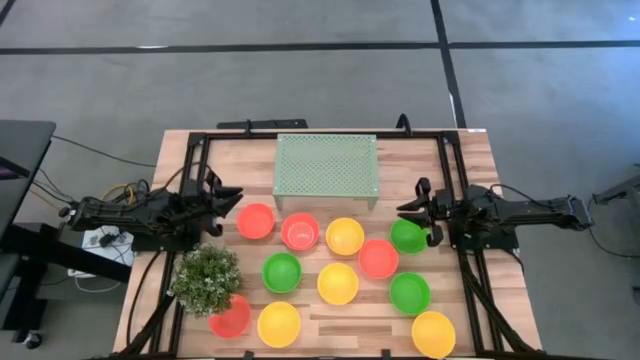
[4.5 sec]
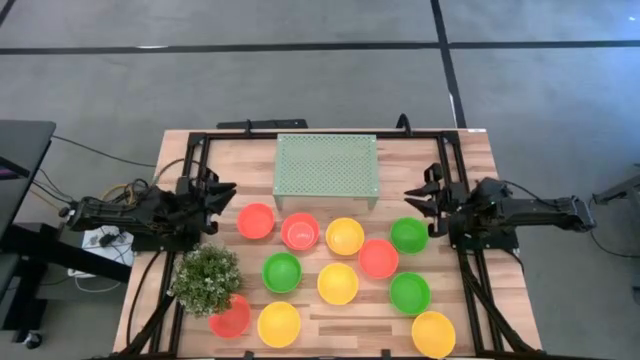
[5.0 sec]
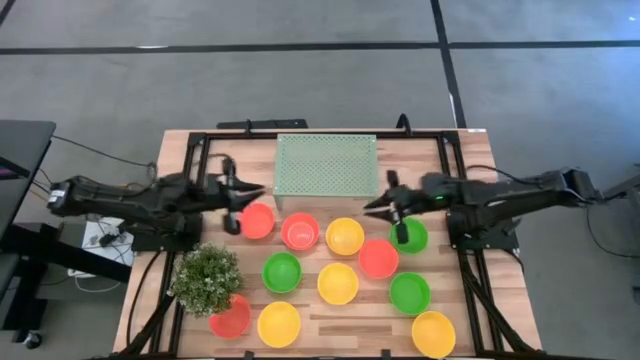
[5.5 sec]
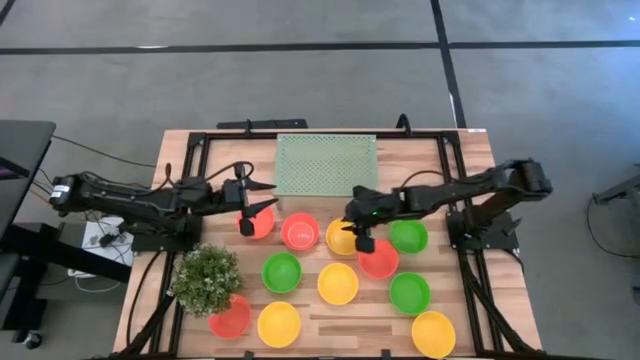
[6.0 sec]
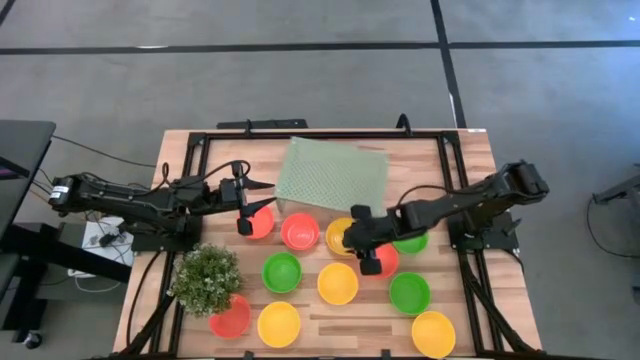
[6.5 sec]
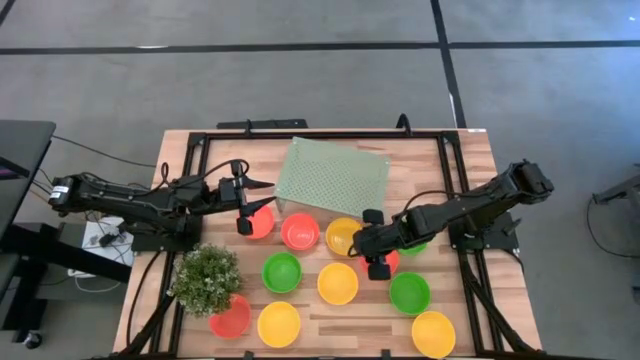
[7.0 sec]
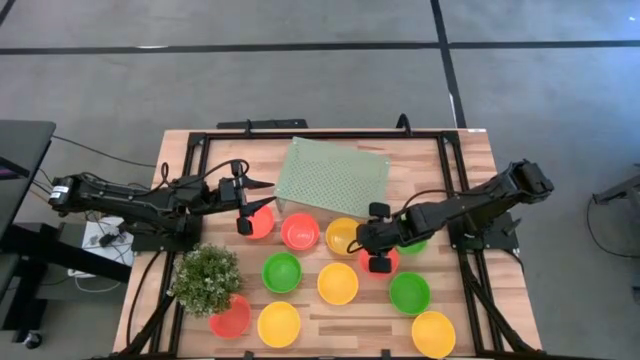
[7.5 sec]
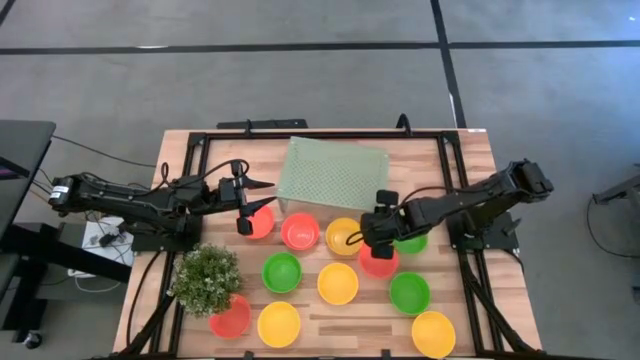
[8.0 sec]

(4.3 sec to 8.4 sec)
Task: Pick & Place Mini bowls
Adjust the shelf on the table

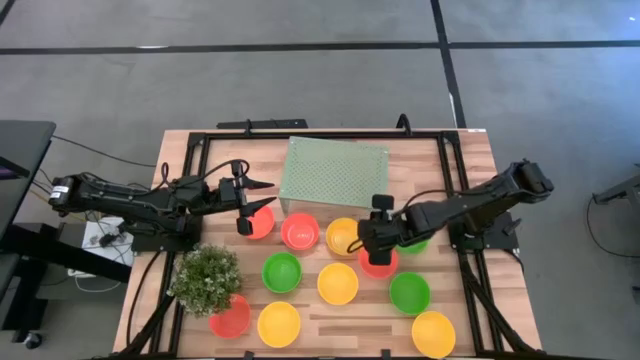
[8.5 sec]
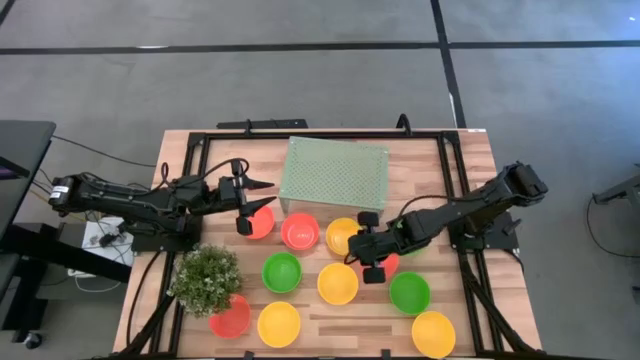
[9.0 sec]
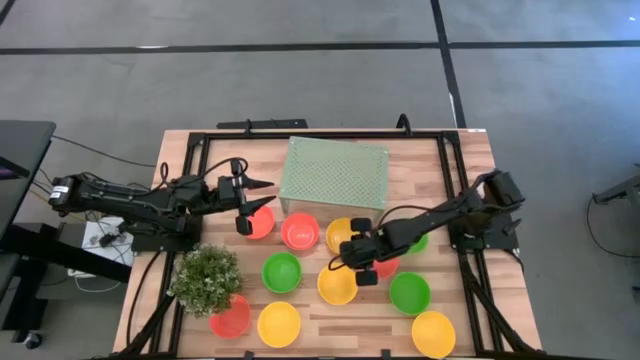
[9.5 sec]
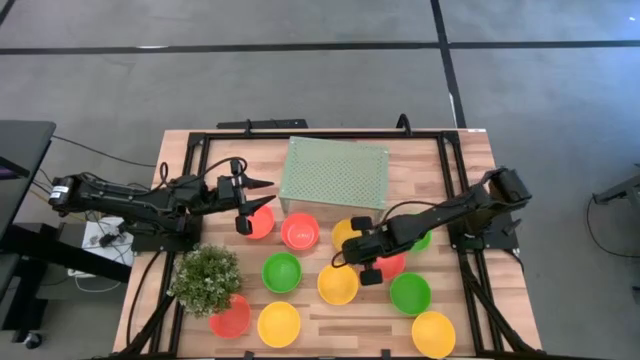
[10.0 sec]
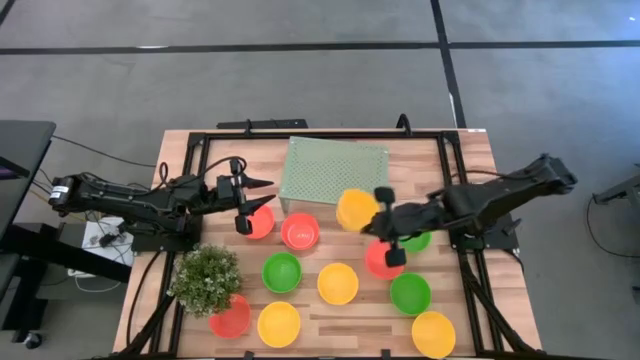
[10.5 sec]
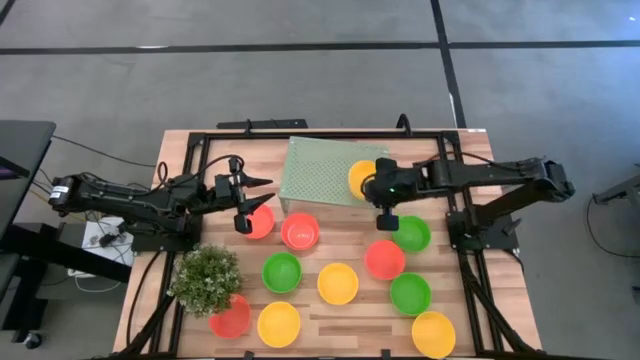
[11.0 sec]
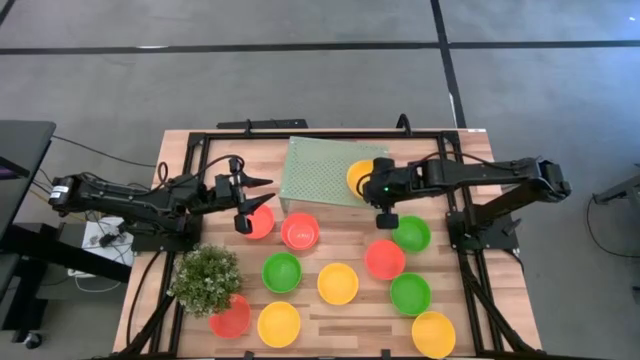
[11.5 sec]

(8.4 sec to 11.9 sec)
Put the yellow bowl on the shelf

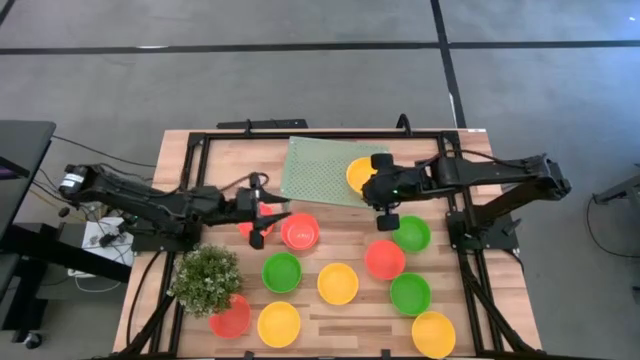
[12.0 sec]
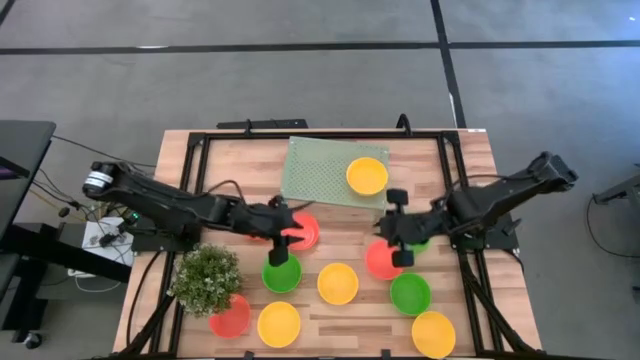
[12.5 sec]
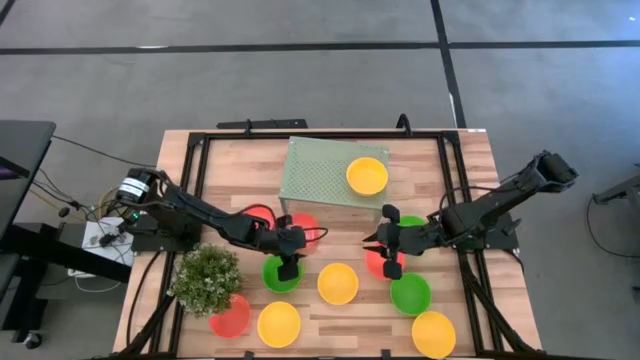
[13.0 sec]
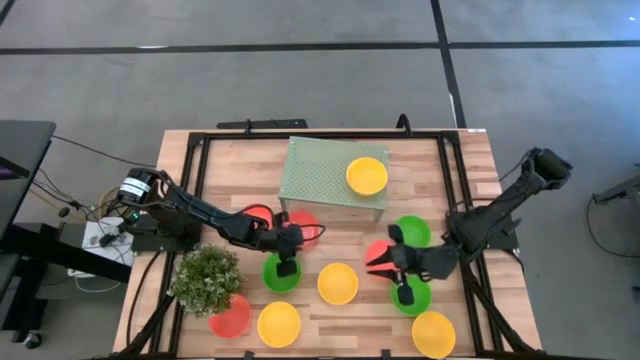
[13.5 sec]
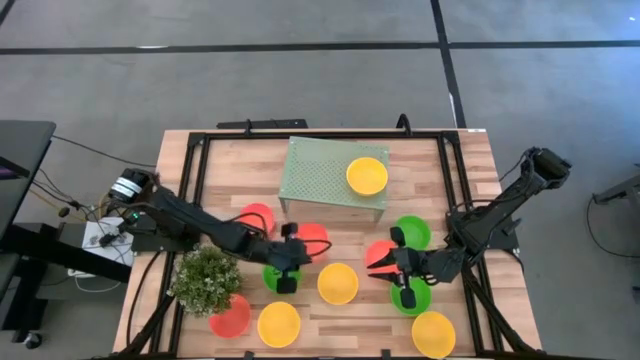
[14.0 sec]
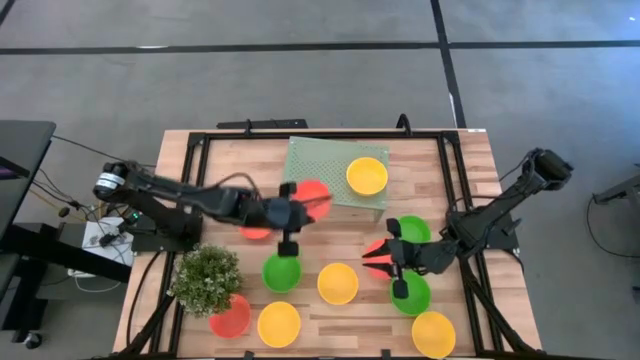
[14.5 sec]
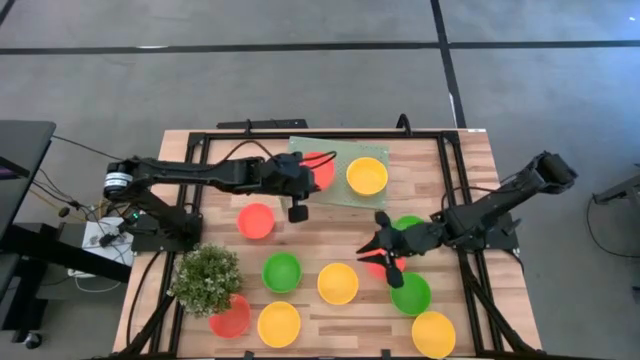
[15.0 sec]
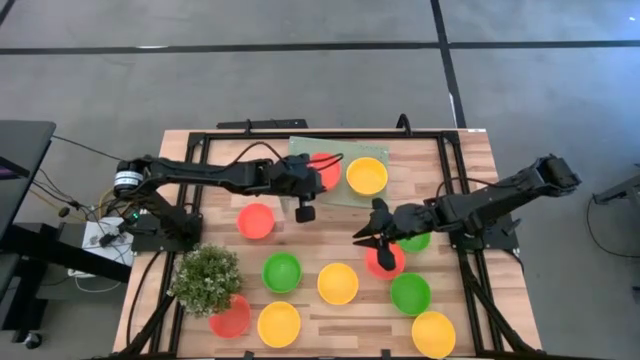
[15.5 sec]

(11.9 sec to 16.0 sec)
Put the orange bowl on the shelf

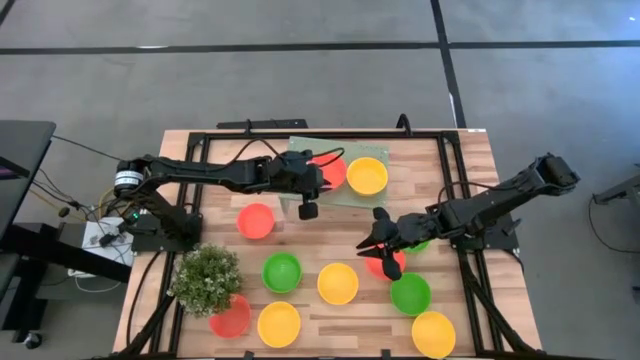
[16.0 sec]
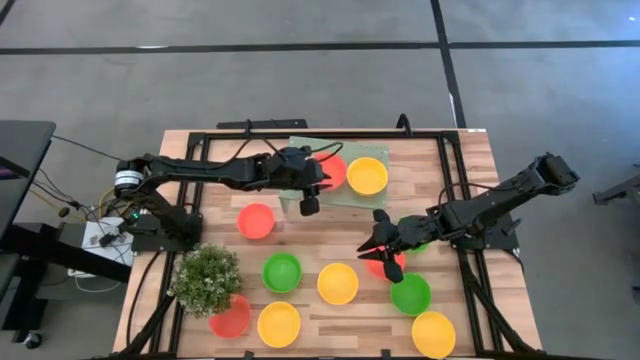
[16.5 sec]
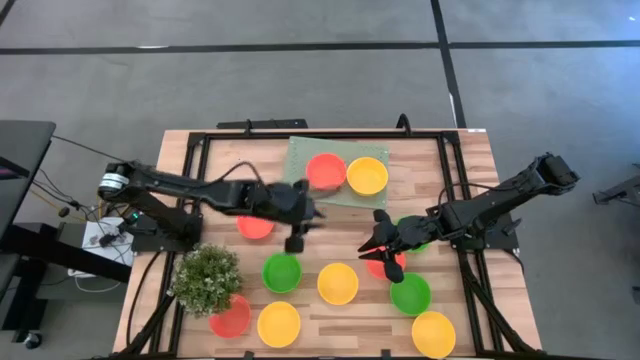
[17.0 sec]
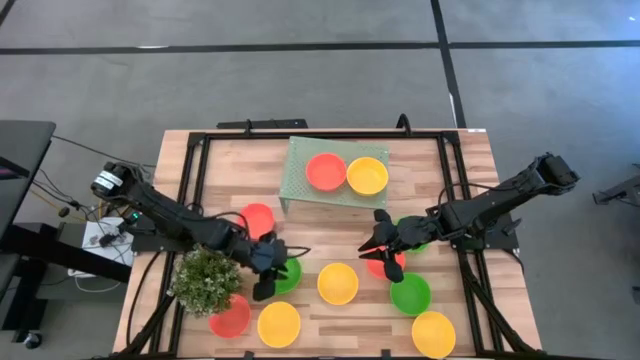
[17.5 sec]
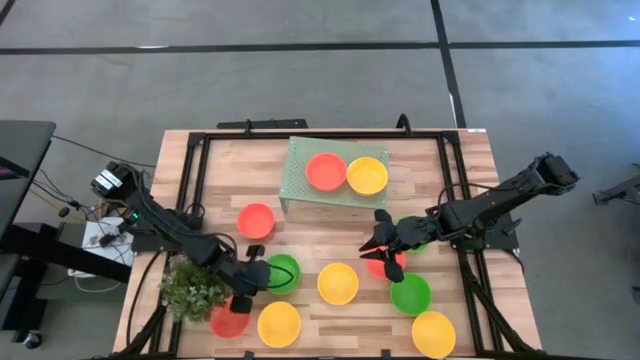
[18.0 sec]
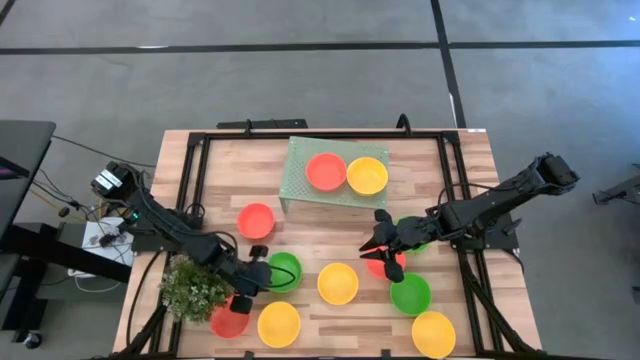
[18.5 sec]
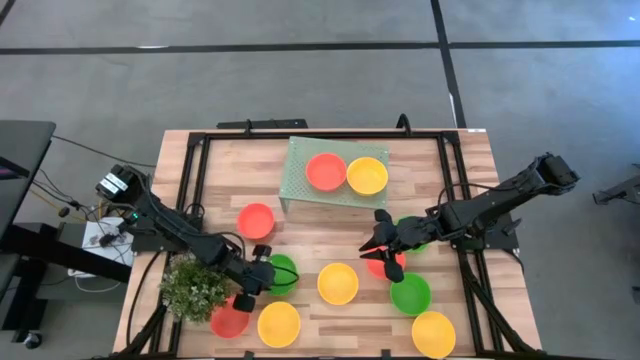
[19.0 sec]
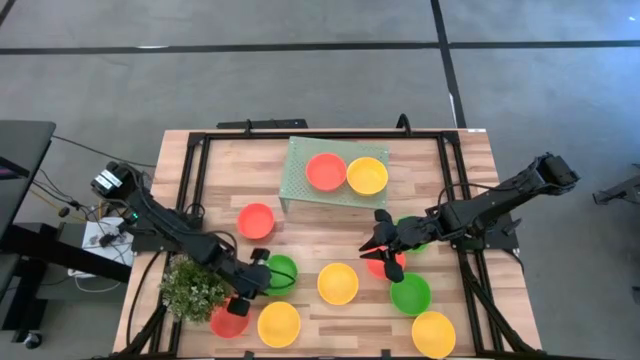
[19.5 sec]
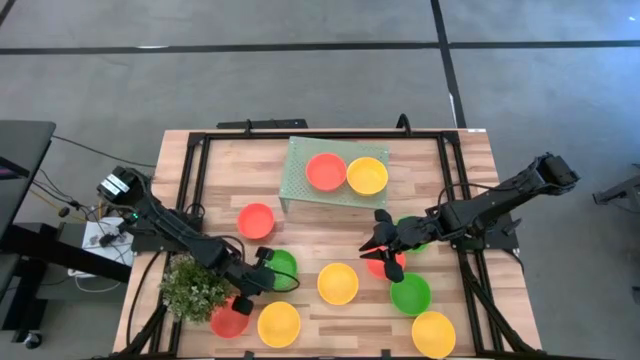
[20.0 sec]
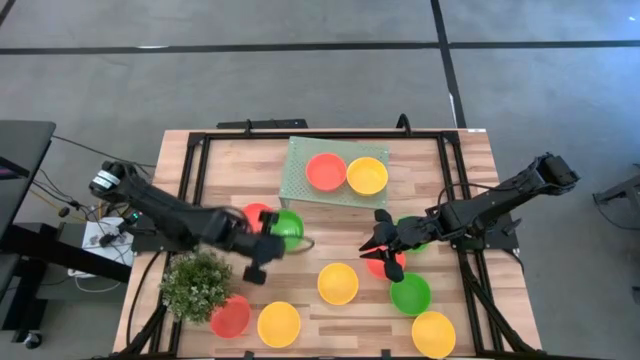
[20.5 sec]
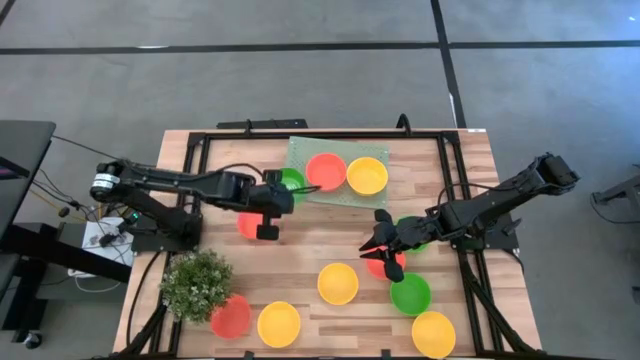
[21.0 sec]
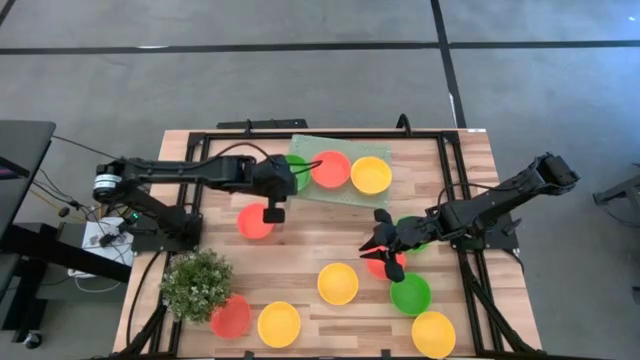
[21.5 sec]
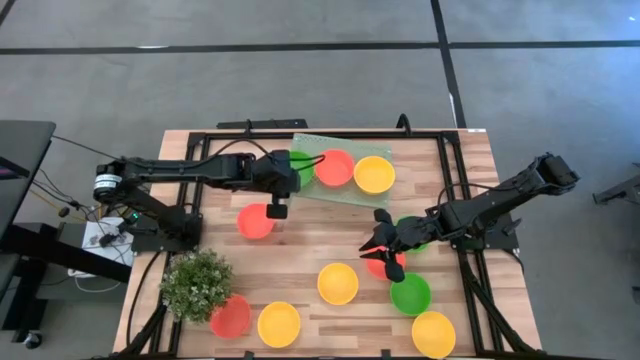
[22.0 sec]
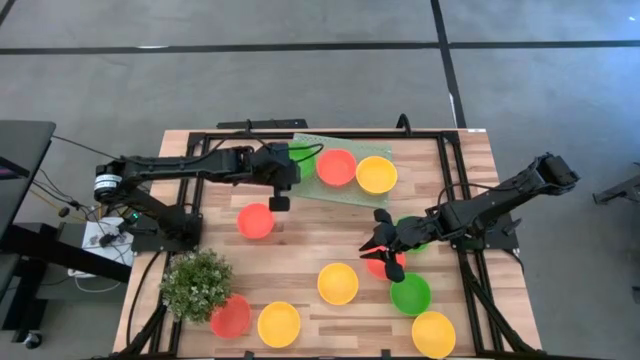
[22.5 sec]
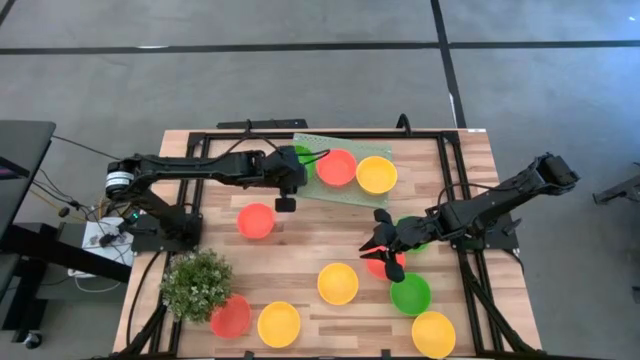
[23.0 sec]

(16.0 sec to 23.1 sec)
Put the green bowl on the shelf

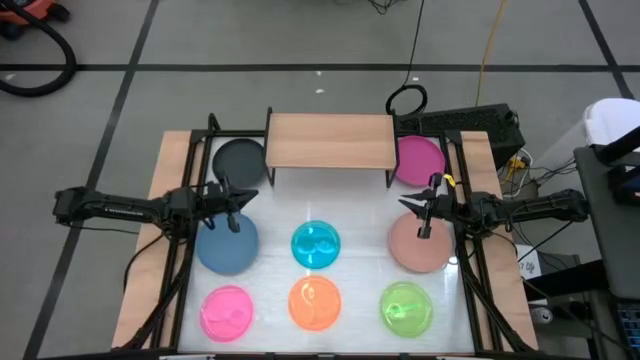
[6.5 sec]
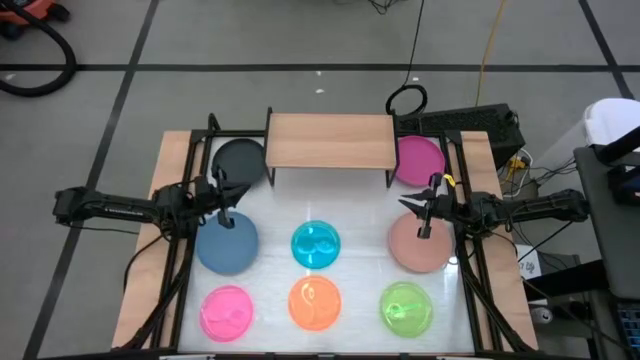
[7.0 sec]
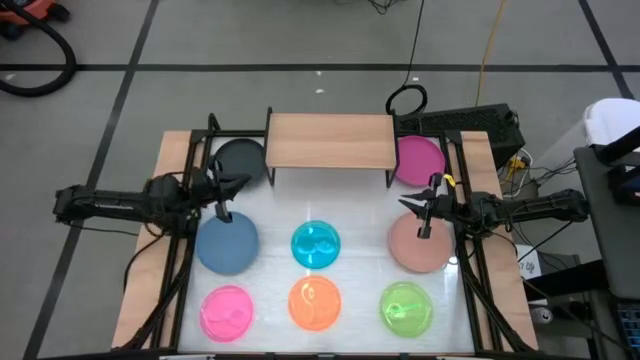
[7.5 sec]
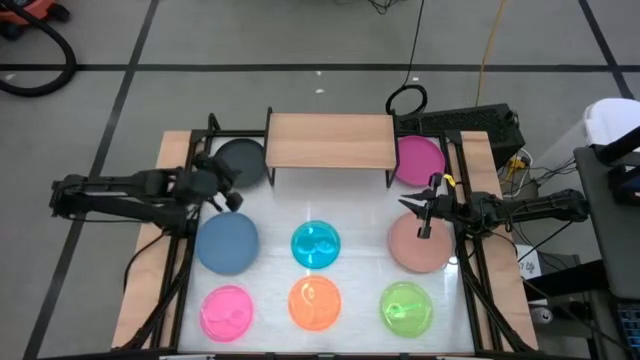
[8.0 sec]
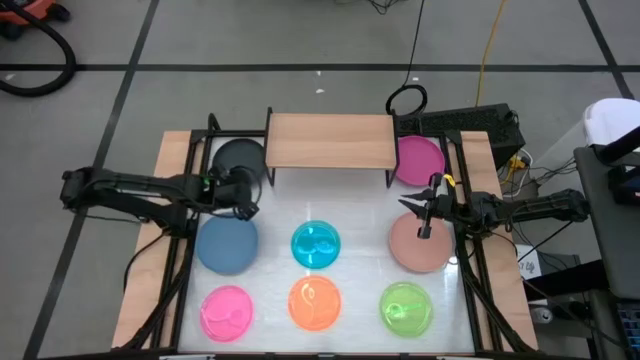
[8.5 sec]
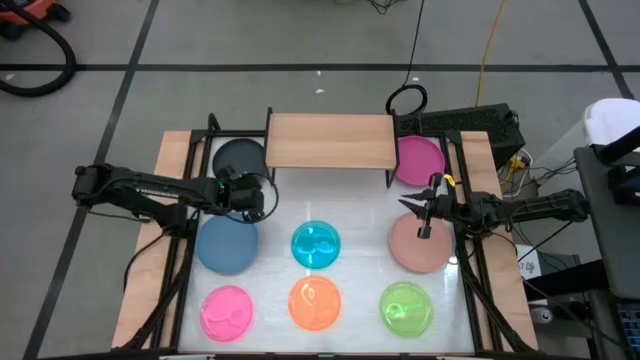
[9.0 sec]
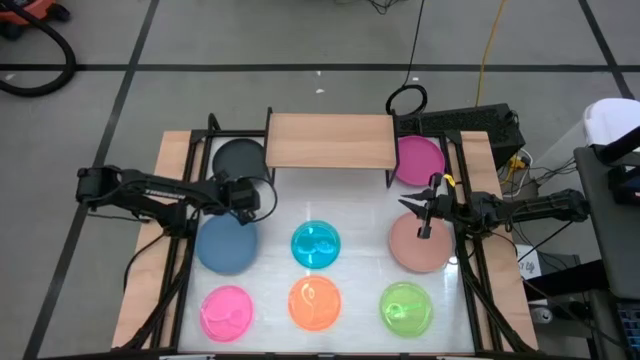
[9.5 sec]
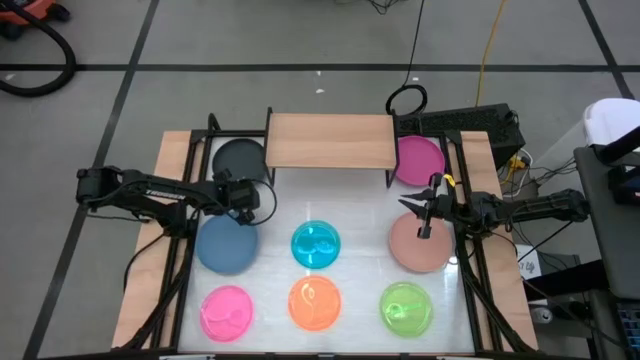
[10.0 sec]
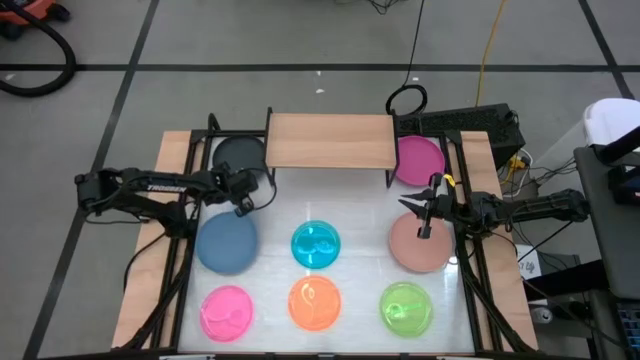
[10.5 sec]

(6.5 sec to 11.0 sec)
Task: Place and stack plates onto a shelf
Put the black plate onto the shelf
